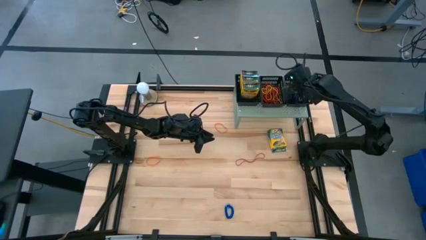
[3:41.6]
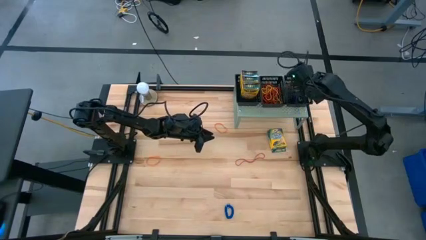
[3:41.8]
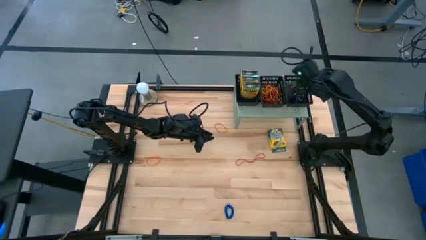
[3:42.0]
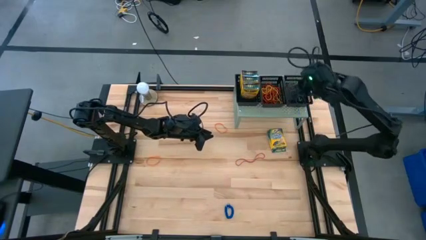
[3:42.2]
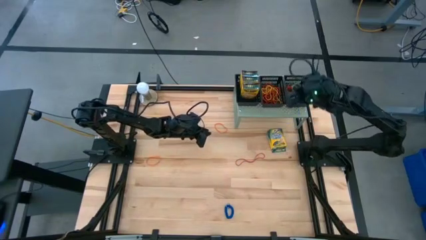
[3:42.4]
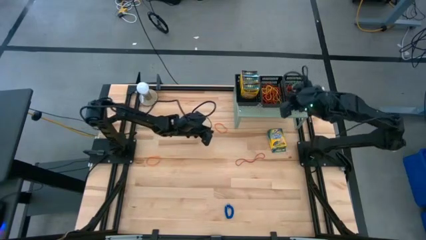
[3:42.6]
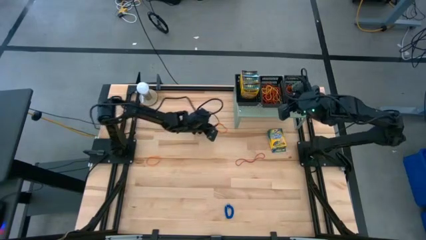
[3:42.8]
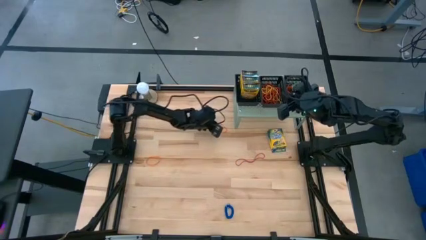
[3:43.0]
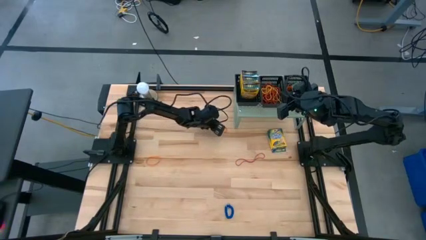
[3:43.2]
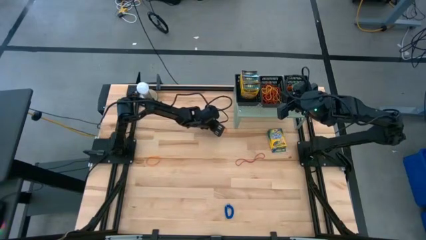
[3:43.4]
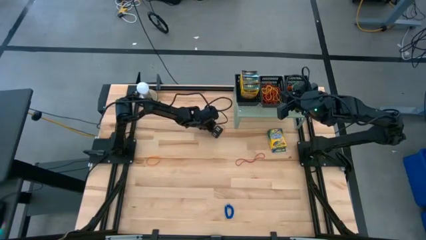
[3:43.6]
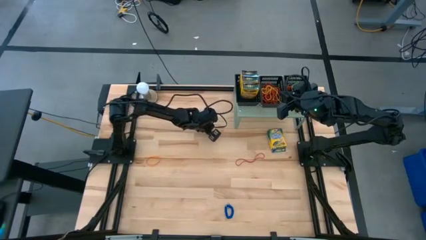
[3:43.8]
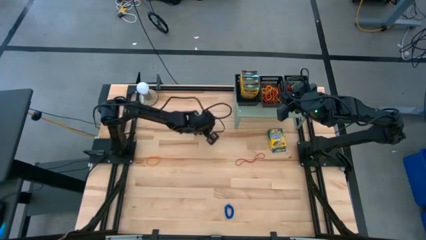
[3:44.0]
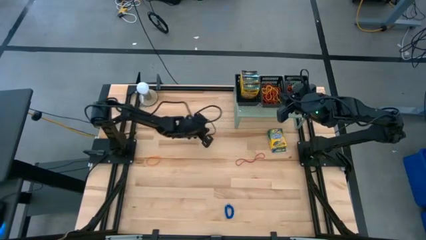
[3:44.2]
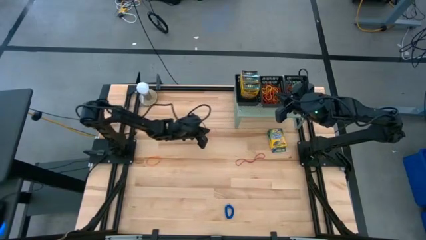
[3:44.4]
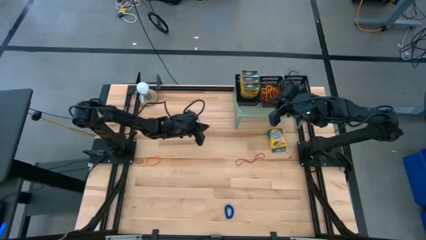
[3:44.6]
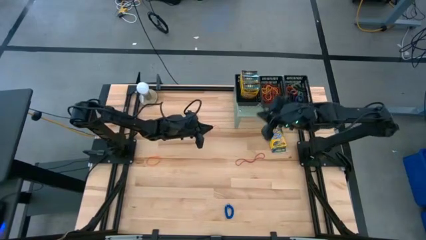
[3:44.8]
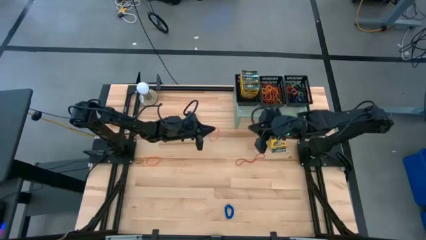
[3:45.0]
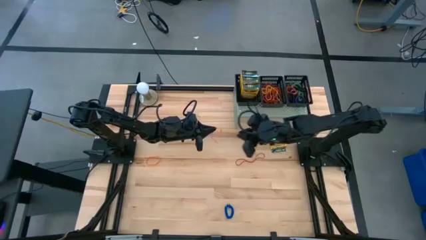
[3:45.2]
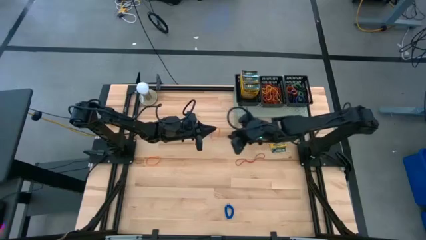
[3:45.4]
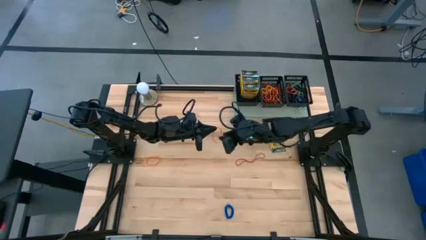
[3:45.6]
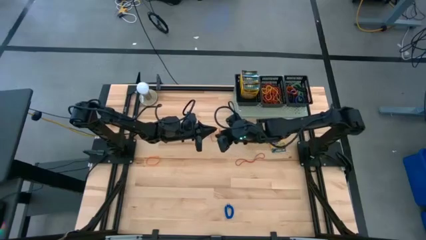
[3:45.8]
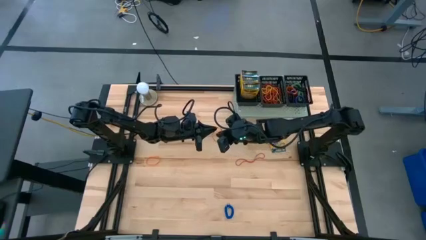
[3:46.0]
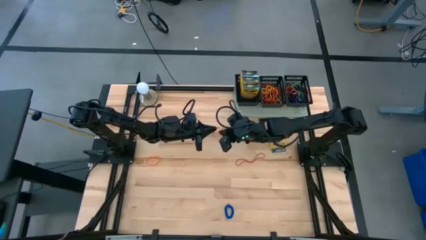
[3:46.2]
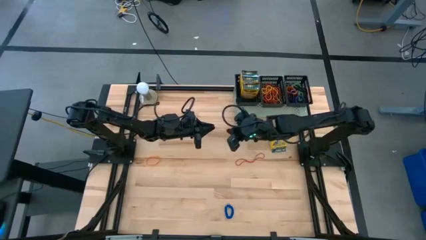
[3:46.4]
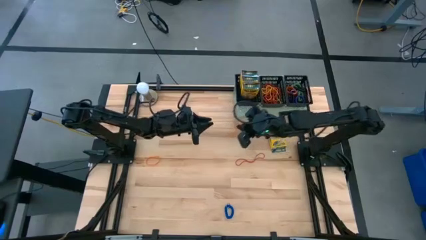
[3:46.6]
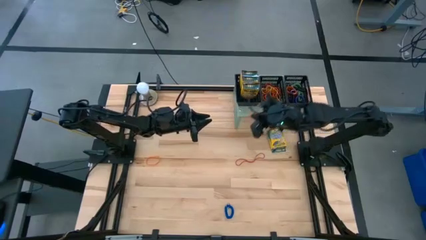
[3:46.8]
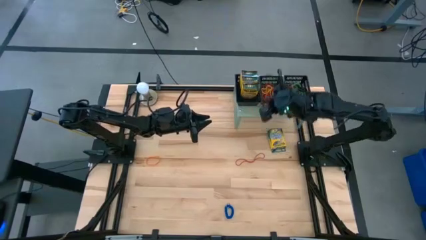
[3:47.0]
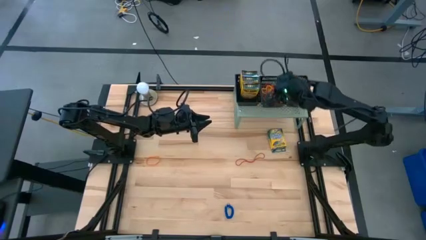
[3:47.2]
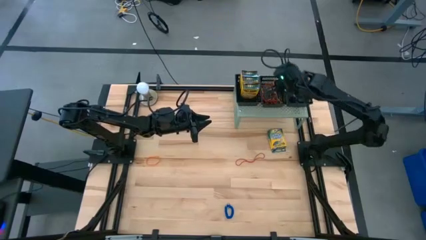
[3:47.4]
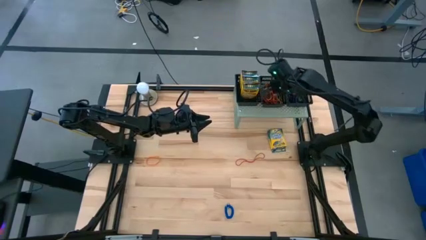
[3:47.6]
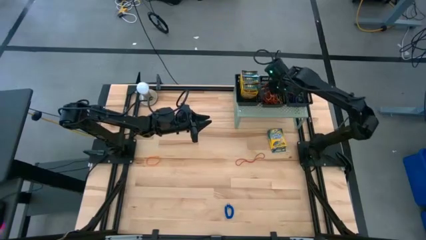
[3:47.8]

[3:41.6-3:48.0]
Task: Pick & Place Office Desk Supplies
Put the top orange rubber band into the middle black basket on the shelf

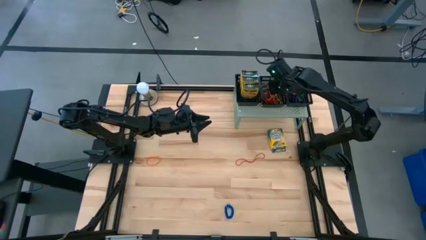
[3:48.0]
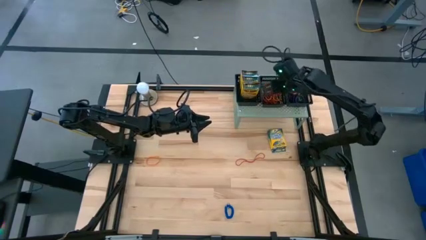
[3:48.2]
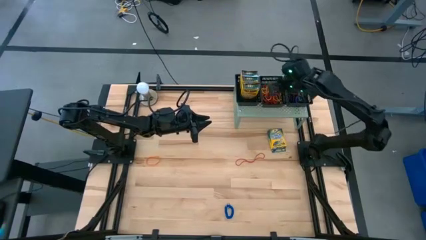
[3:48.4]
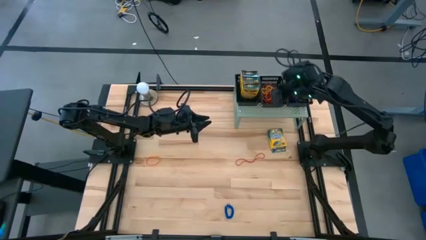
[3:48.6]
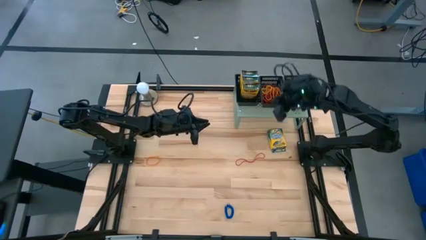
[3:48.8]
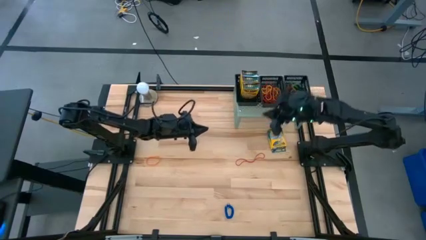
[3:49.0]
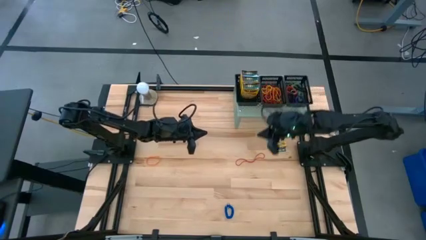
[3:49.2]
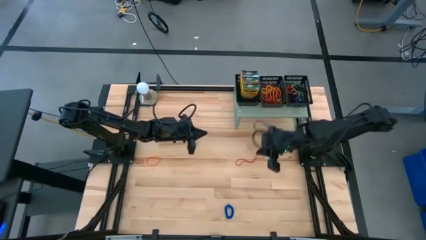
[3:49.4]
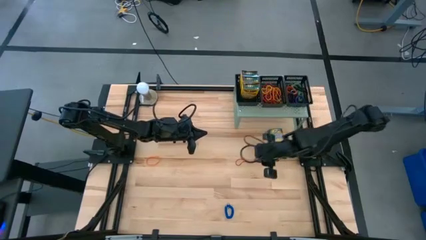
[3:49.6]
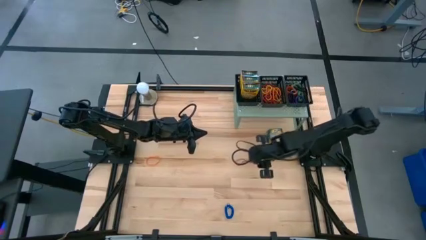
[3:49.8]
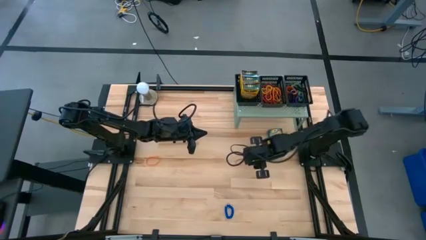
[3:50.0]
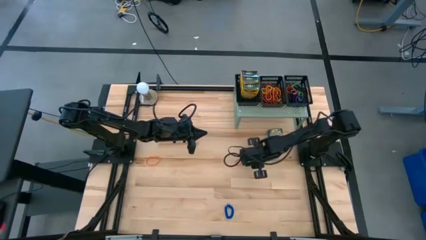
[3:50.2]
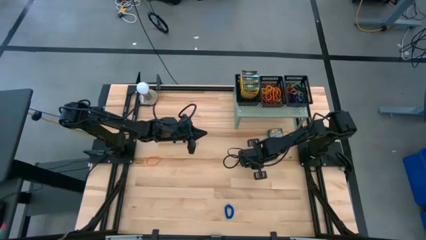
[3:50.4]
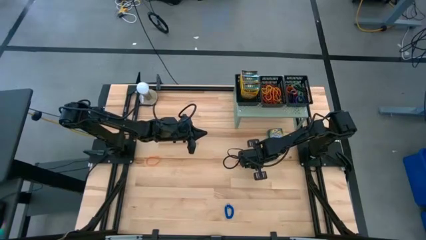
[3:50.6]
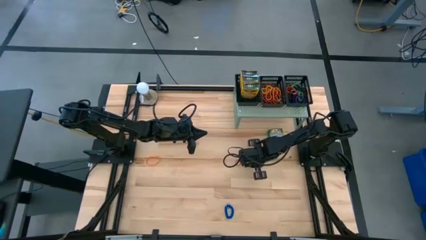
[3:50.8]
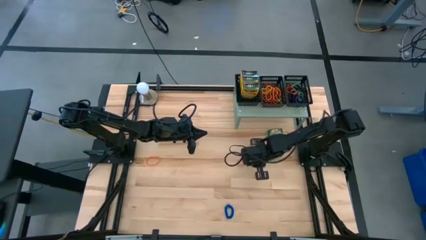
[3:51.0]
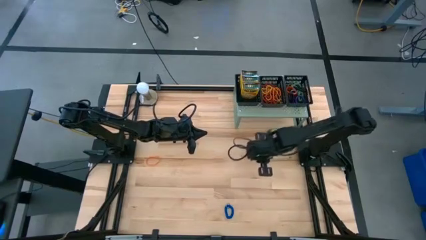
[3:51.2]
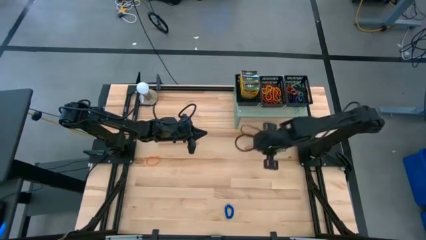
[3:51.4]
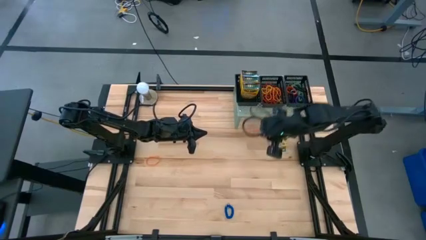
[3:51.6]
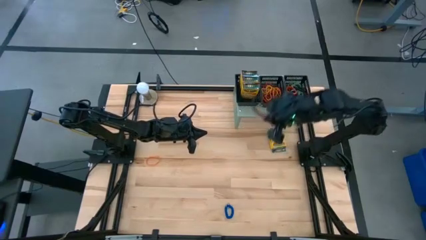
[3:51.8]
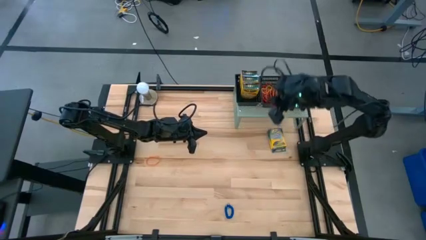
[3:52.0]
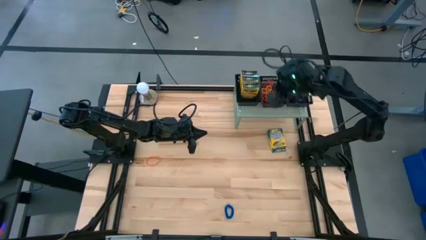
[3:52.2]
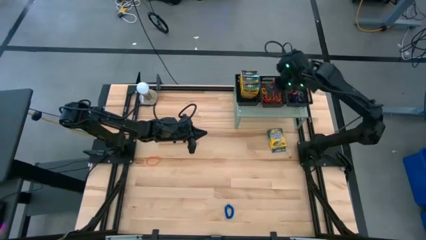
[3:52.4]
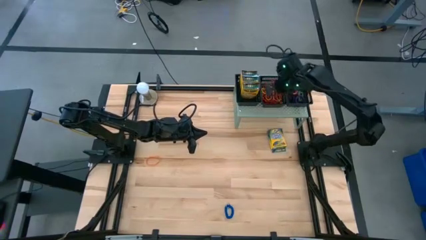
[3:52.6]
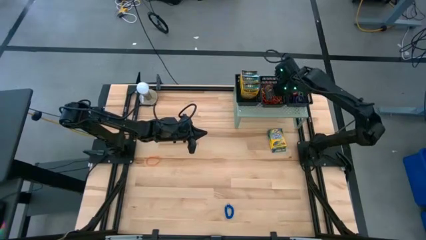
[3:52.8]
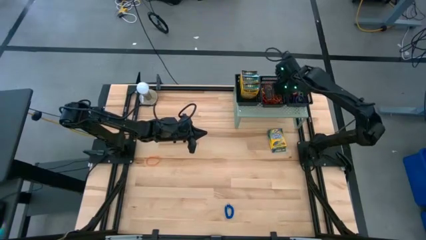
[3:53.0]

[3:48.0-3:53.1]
Put the red rubber band into the right black basket on the shelf

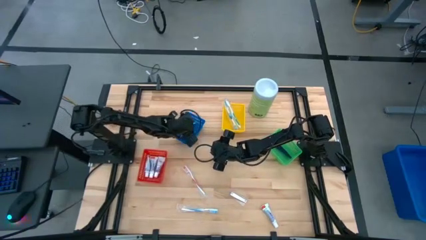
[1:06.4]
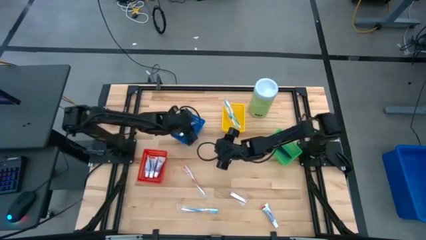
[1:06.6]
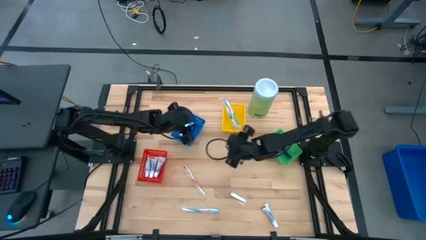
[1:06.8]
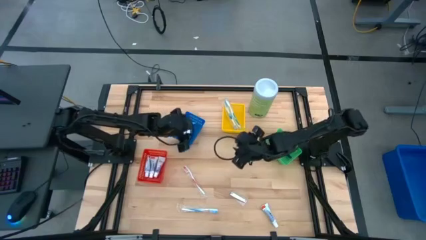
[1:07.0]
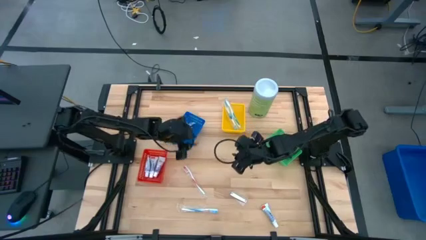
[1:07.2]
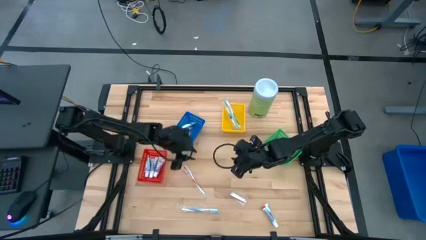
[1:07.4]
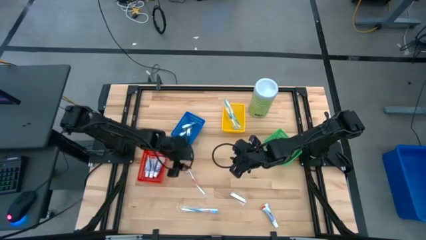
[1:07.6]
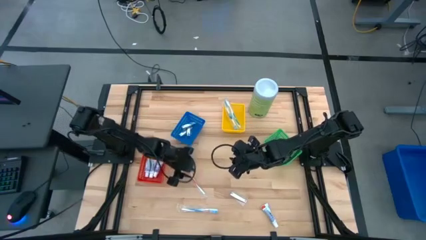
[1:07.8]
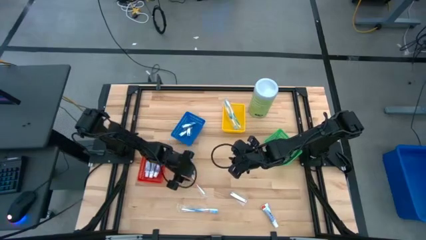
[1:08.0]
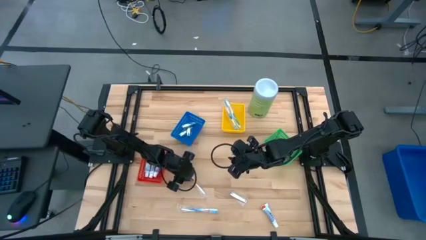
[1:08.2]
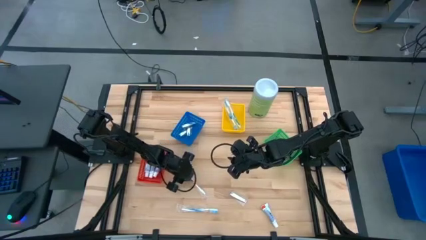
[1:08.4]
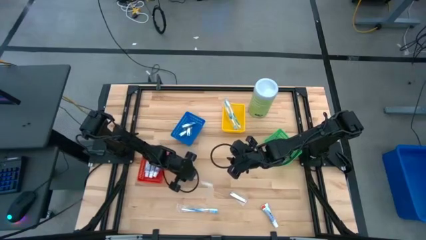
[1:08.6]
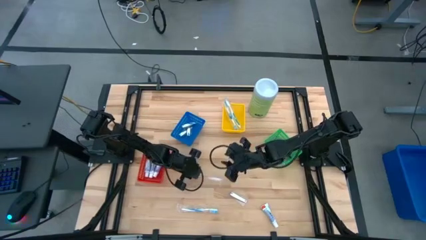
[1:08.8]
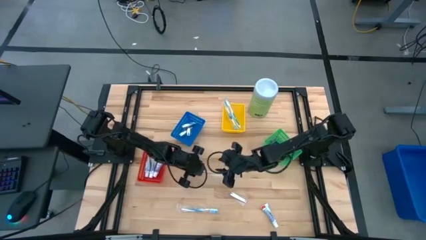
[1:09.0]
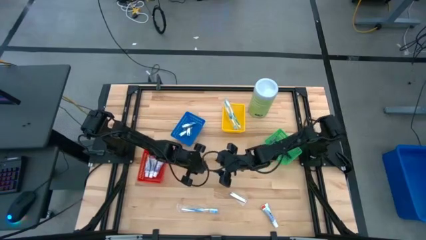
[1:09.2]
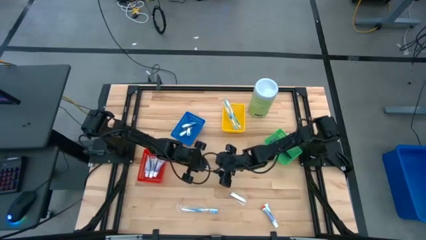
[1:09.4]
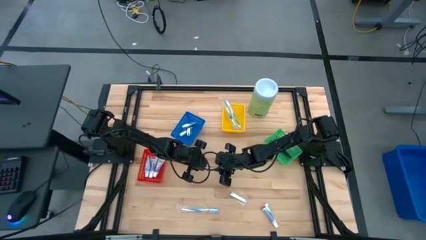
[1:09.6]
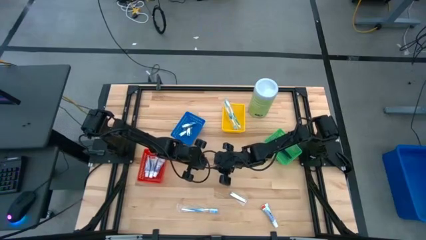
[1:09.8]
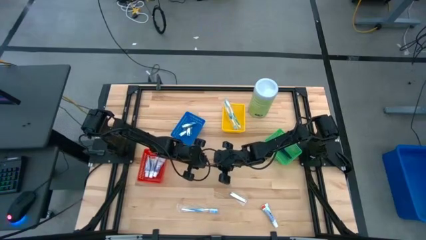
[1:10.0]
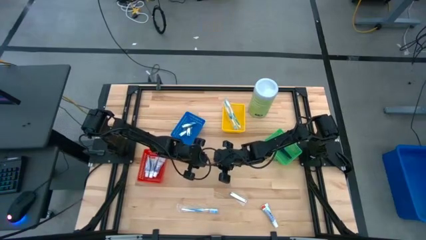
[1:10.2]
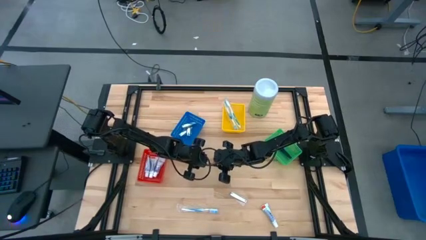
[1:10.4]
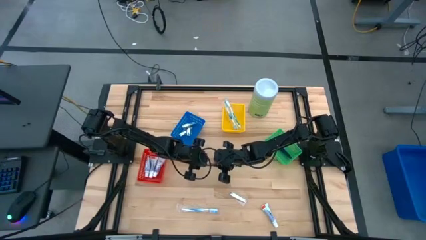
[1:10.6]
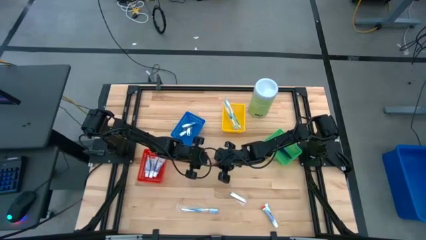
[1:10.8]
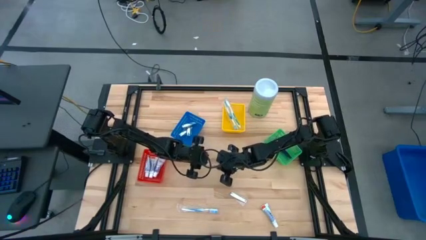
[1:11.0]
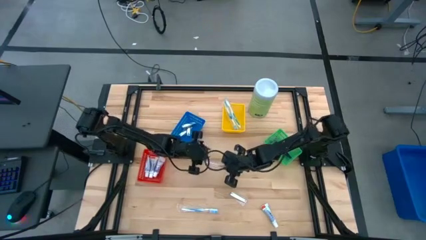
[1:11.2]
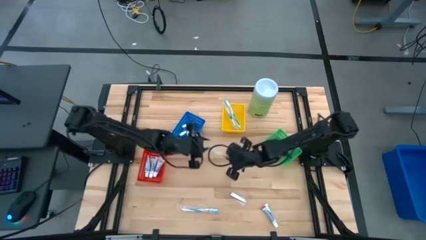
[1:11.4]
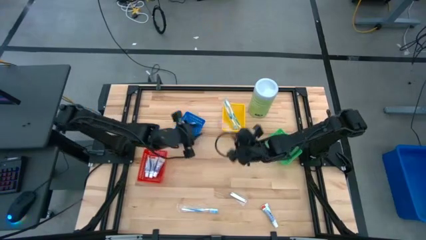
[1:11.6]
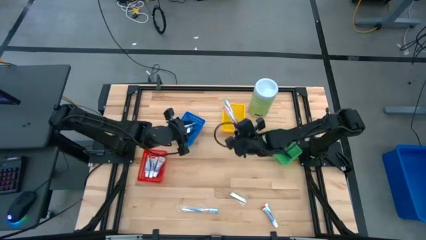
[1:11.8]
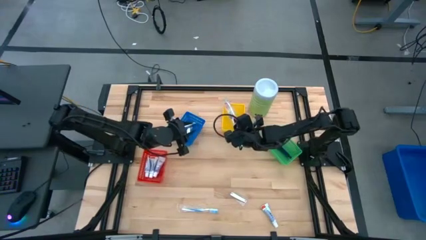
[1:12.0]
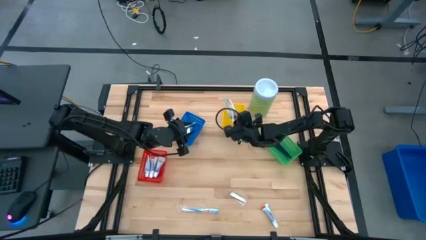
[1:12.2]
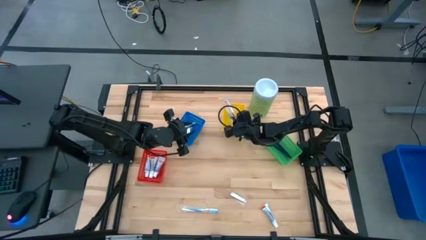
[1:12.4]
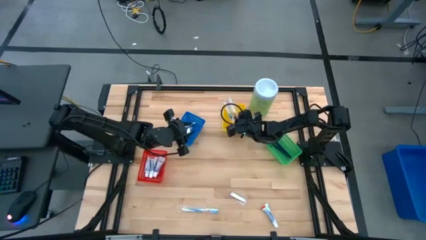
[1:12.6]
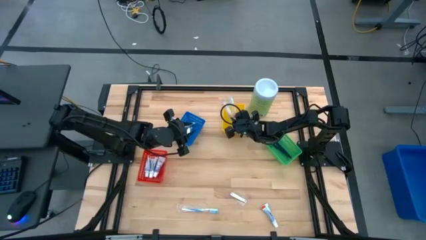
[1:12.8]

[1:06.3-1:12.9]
Task: Pick & Place Travel size toiletries
Put the red toothbrush into the yellow basket
